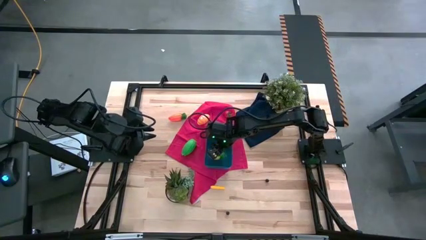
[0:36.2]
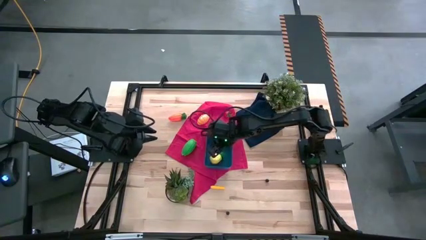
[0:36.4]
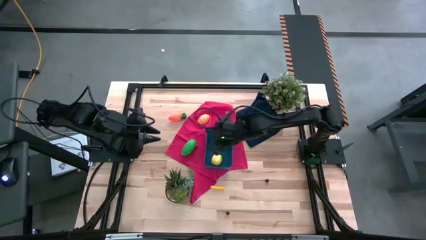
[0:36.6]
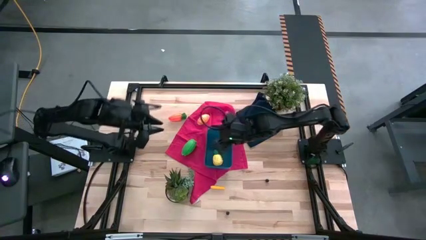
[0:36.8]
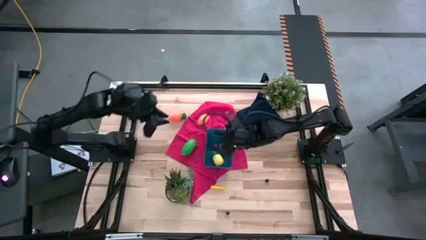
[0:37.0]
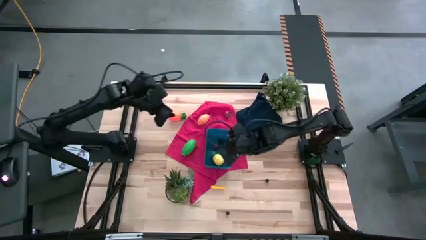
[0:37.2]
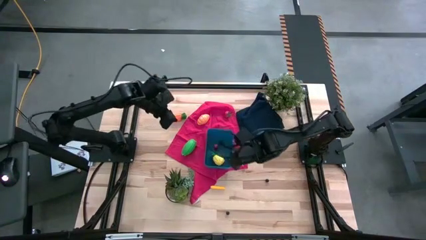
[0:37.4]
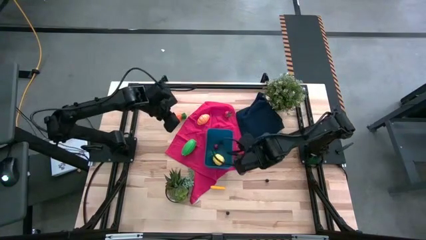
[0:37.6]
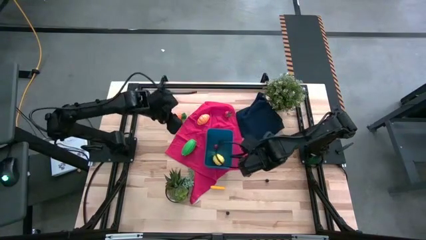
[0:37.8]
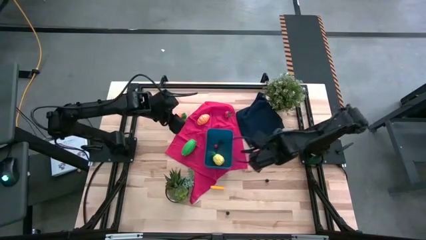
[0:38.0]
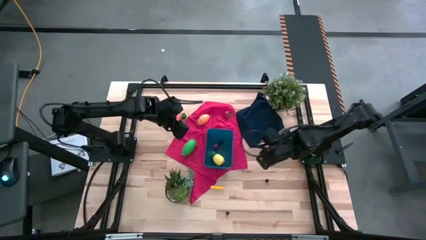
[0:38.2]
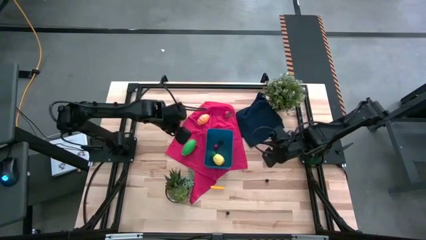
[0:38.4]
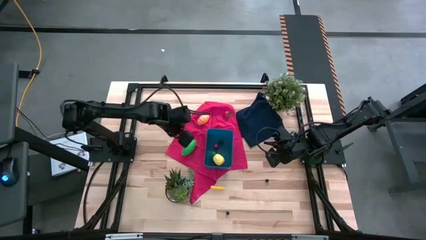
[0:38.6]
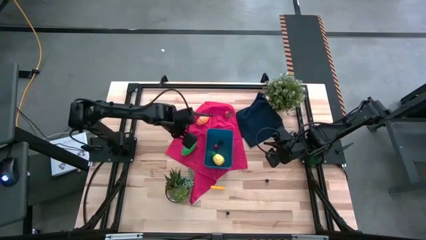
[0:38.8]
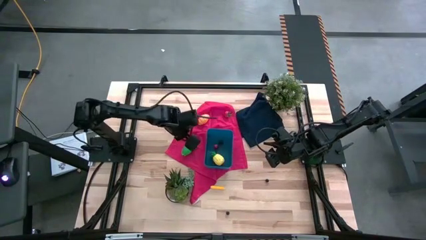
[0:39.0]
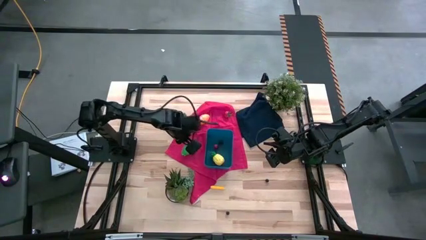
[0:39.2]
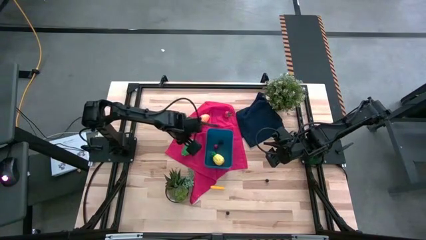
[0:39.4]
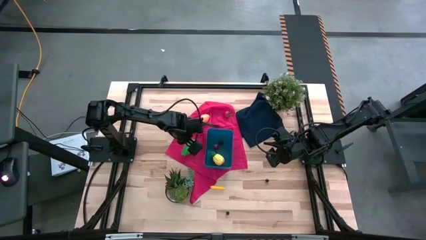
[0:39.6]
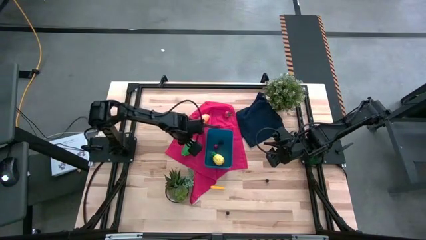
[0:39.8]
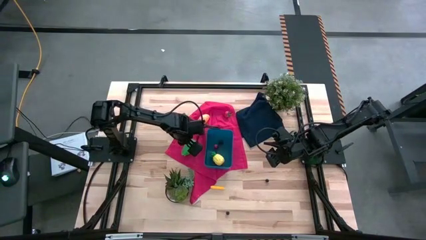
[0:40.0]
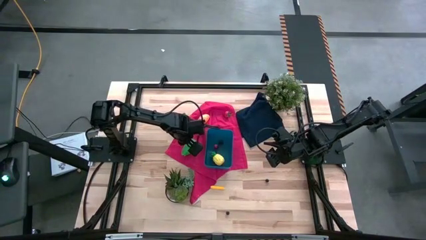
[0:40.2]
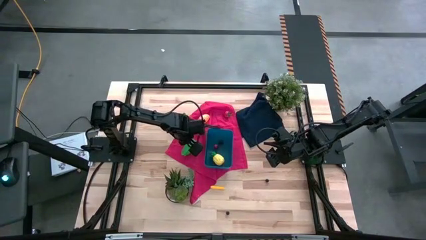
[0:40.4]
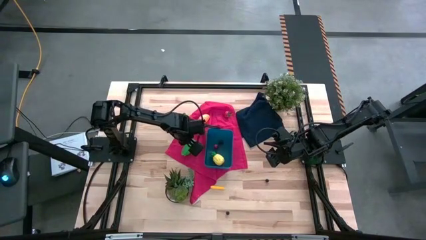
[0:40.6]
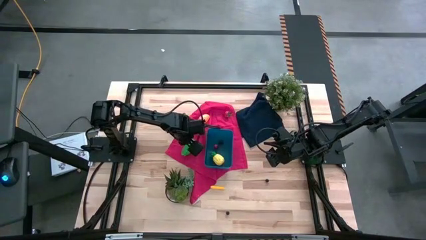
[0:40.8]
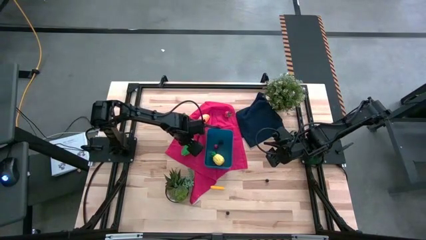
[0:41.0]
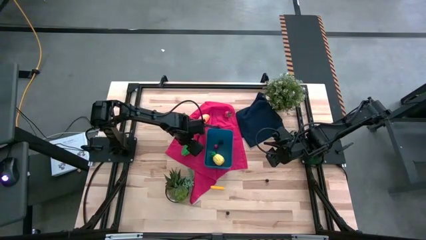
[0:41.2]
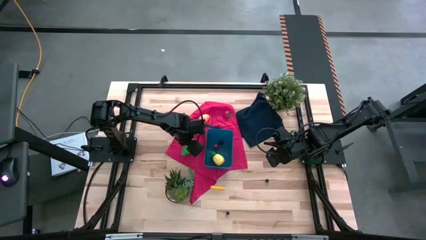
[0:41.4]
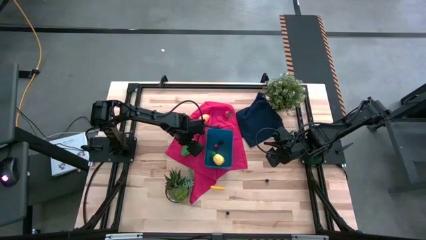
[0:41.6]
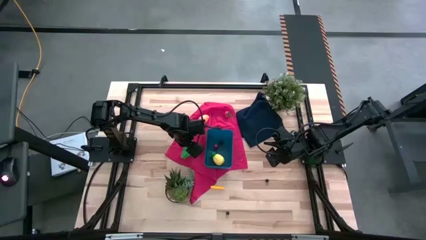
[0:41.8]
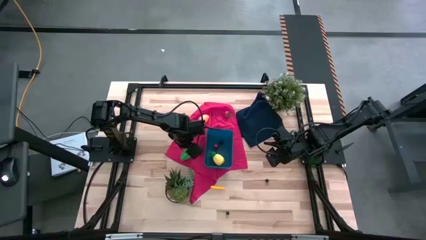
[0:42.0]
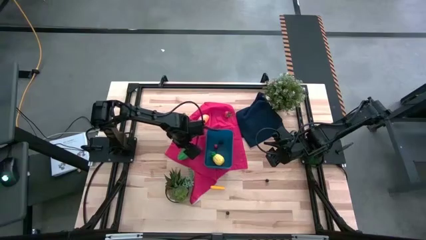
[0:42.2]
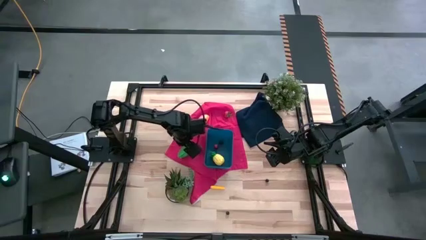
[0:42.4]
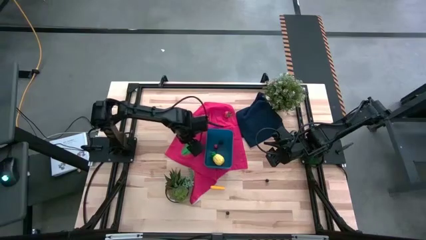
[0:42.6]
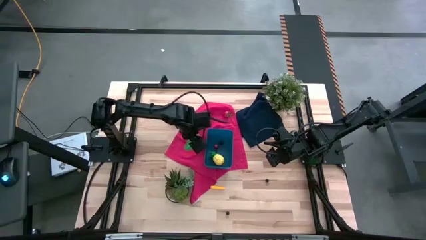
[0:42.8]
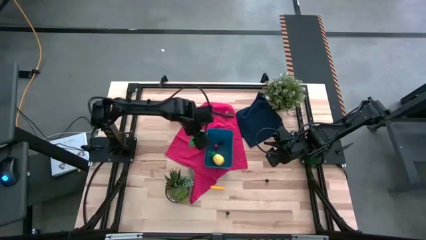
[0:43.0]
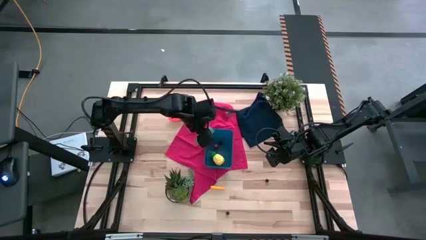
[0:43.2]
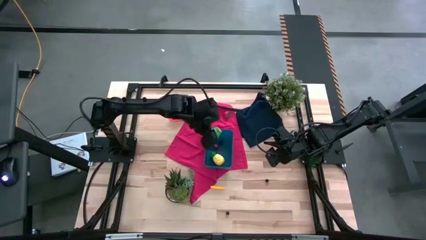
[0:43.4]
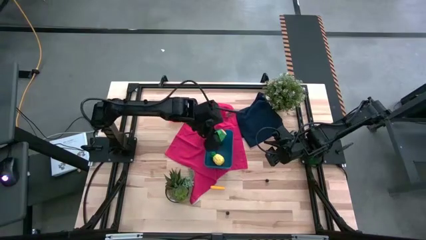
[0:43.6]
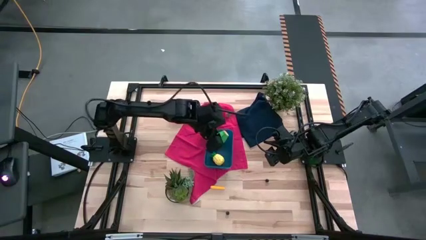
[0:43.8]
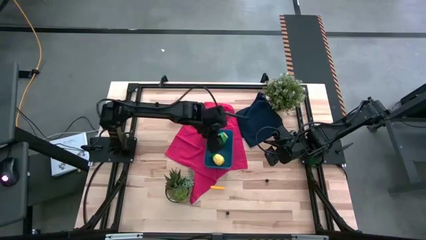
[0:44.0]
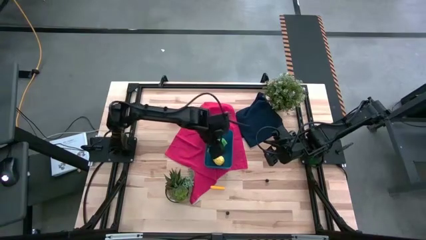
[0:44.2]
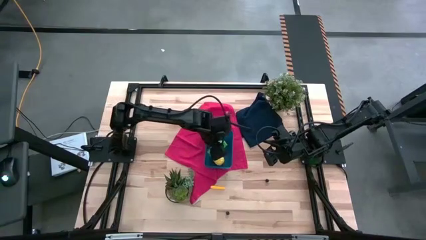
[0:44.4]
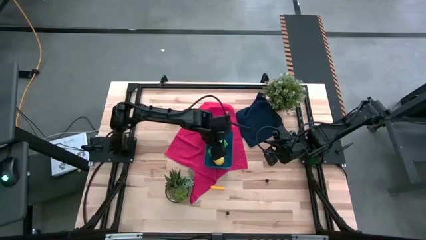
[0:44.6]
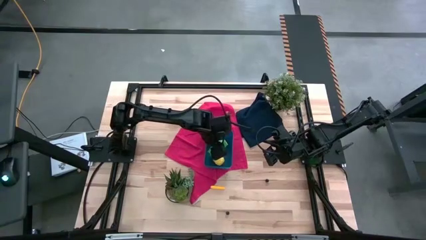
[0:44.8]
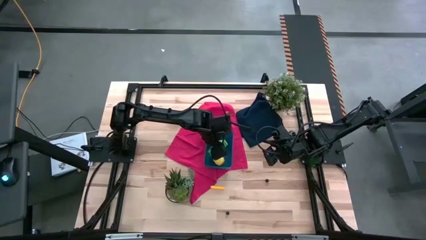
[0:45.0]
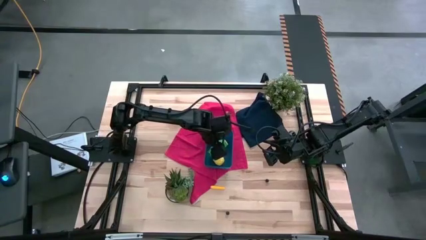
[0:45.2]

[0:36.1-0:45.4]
Task: Pick and placing Produce into tupperware
Put the green corn into the blue bin

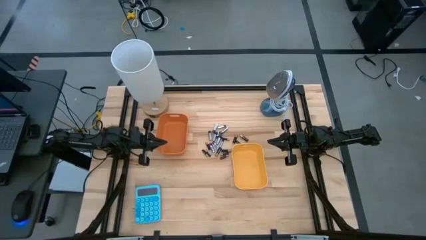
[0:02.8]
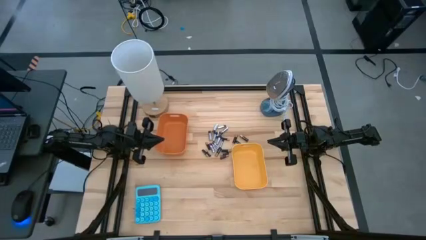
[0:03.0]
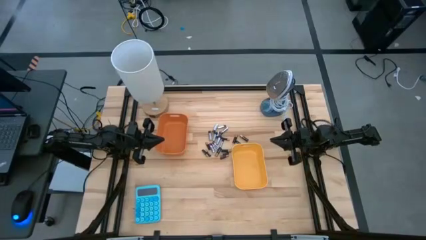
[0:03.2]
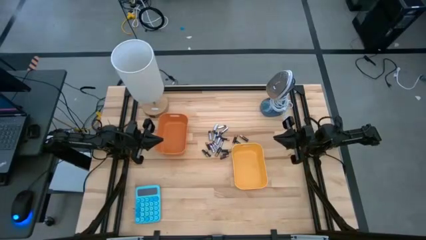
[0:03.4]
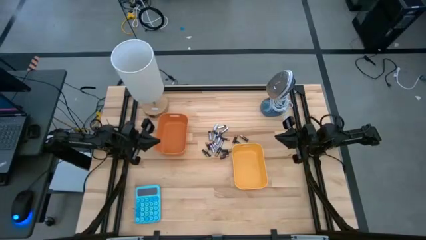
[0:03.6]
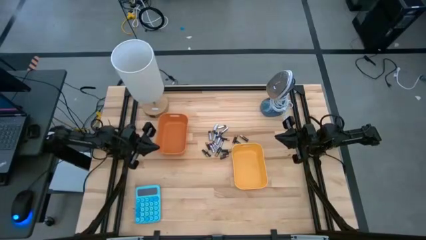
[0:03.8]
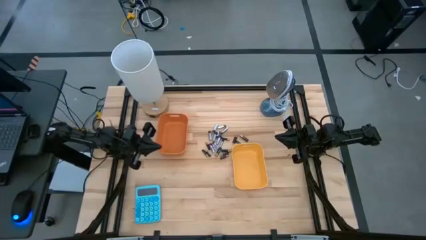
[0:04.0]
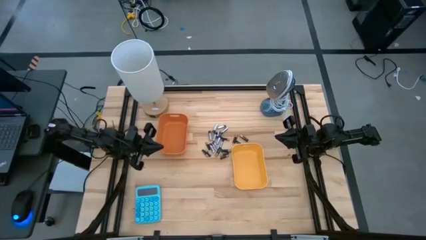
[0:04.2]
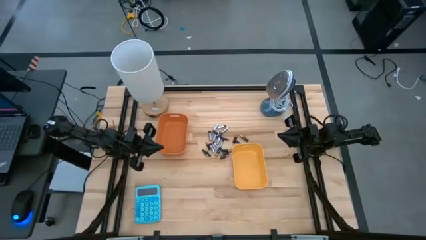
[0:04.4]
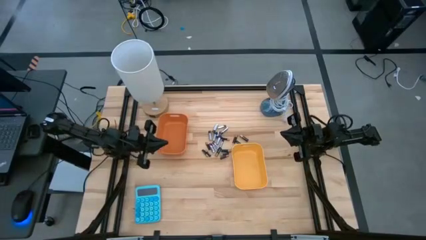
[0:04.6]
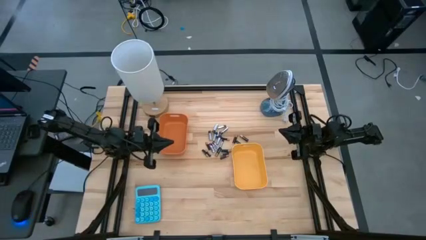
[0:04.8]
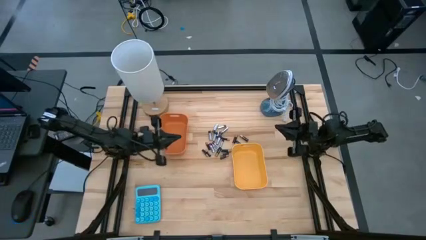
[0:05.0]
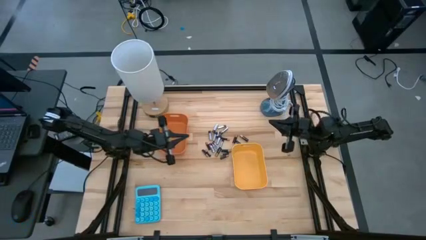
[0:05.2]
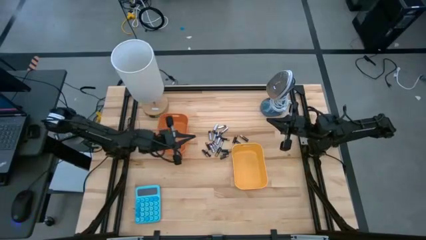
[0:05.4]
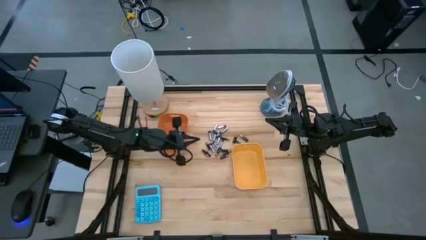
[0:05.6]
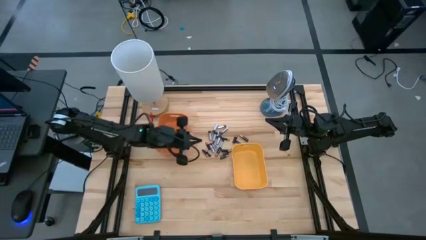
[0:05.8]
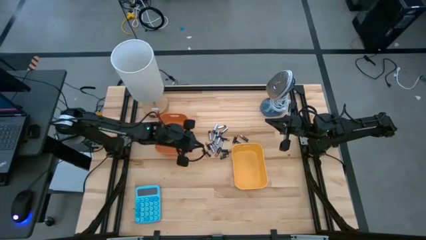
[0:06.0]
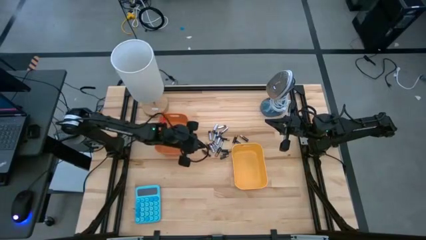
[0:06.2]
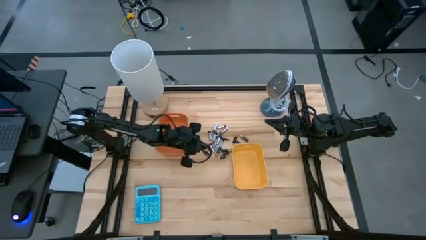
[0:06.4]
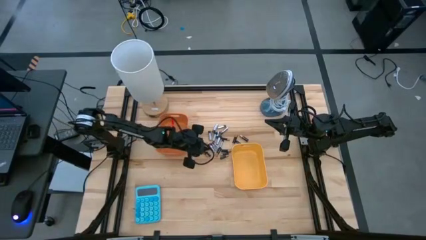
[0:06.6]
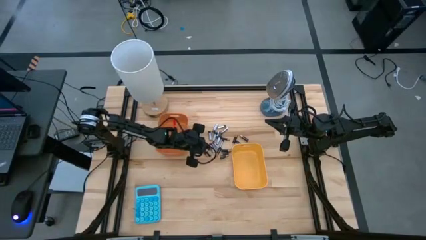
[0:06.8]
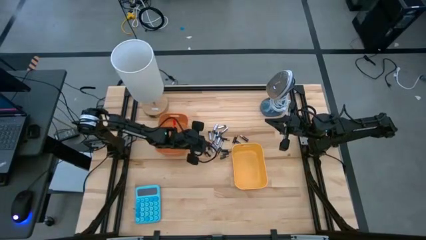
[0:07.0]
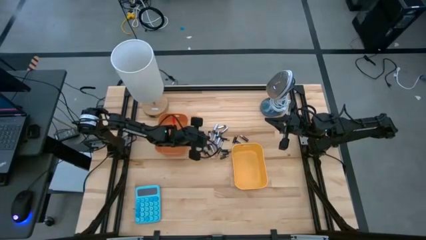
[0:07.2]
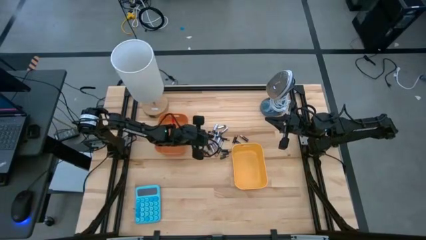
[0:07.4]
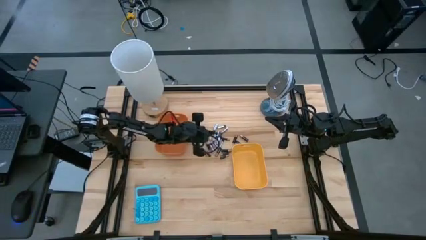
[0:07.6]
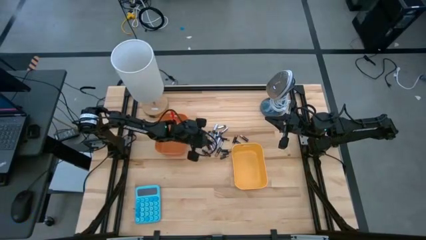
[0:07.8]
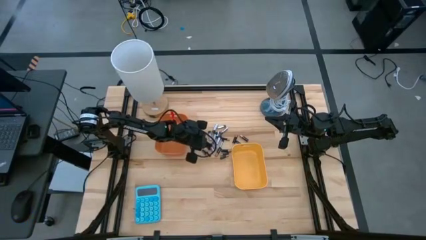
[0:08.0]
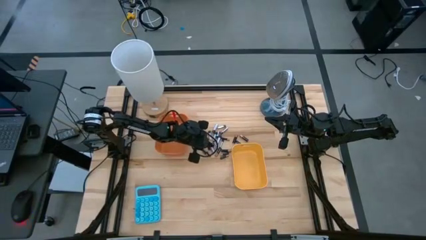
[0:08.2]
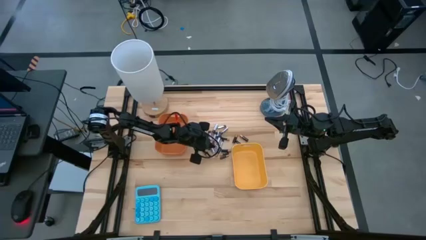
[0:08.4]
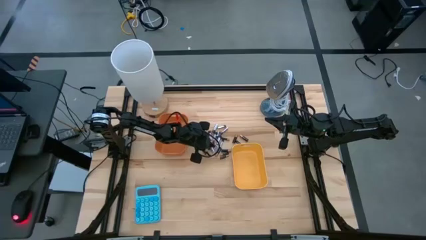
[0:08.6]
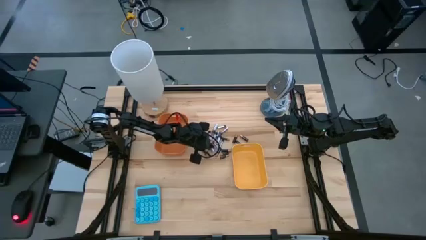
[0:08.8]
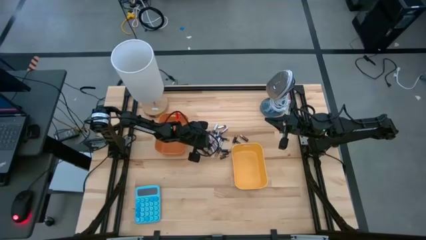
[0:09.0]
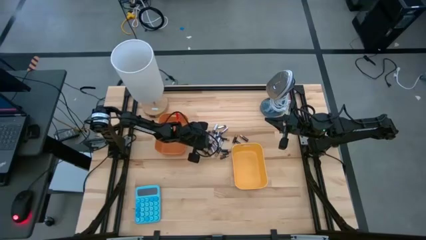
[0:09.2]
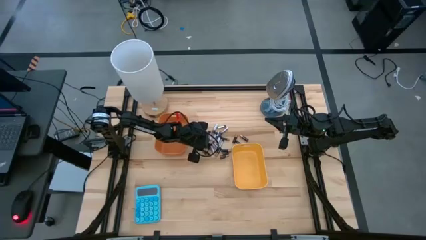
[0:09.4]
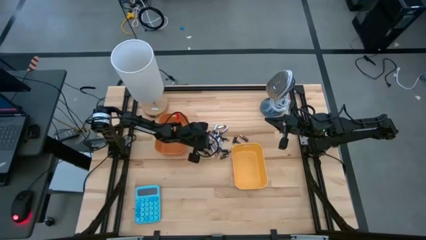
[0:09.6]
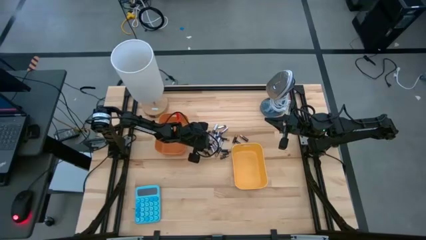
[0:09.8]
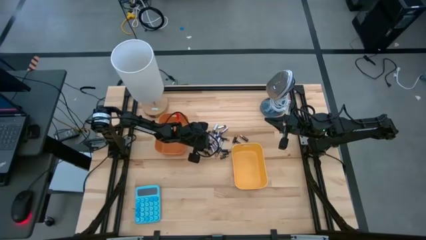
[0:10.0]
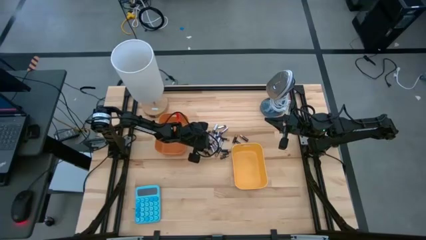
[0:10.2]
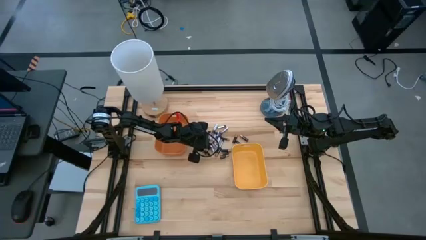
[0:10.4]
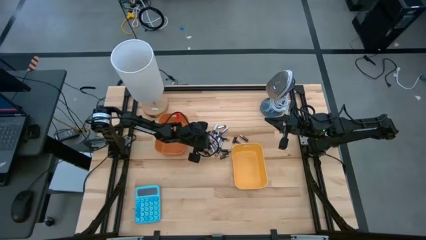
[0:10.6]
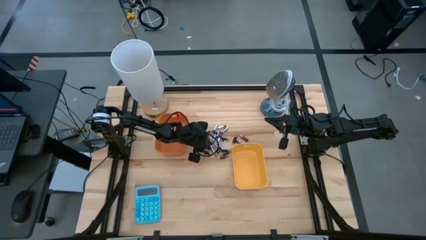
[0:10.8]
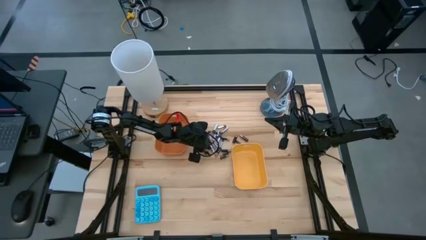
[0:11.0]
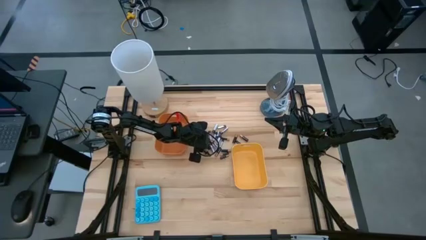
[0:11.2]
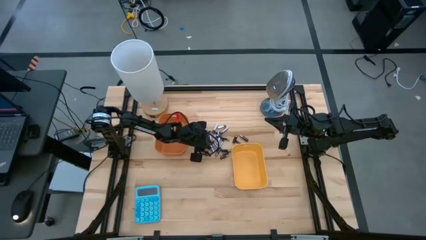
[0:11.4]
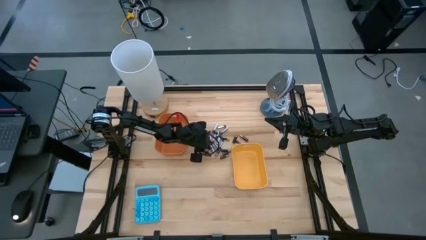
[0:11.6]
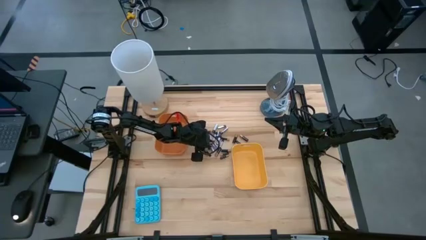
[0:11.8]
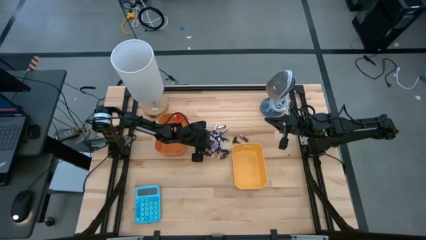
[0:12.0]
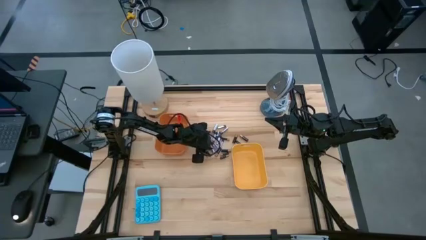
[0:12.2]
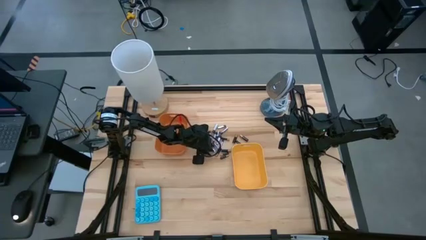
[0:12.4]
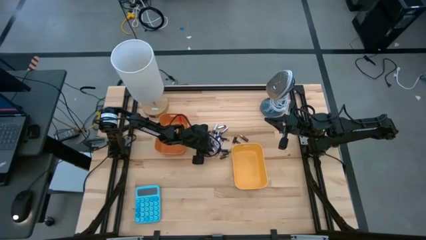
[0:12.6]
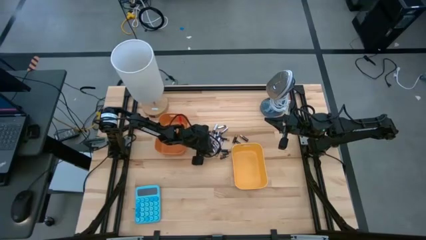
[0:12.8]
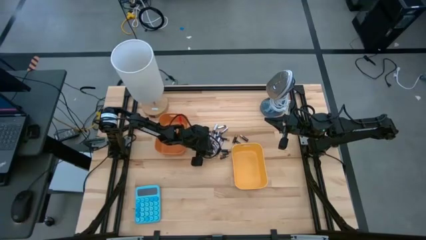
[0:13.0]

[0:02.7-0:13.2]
Task: Sort batteries
Put the silver battery into the orange bin
